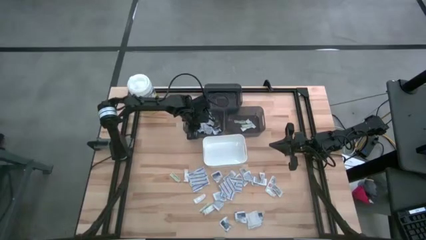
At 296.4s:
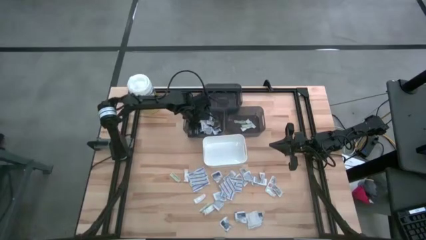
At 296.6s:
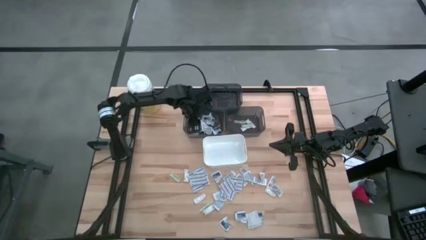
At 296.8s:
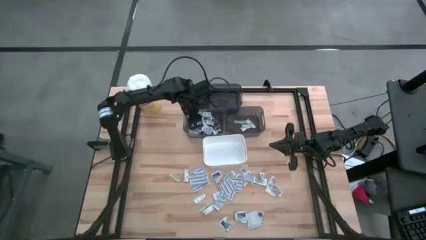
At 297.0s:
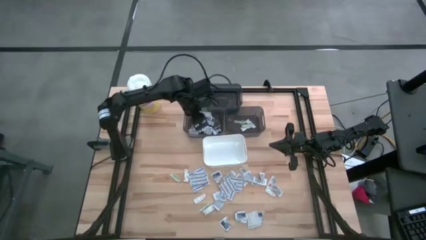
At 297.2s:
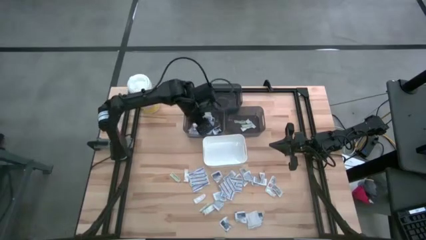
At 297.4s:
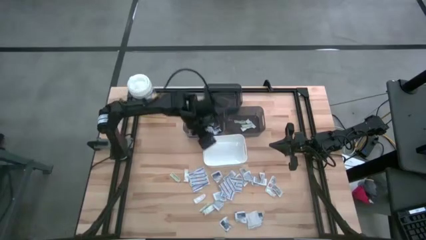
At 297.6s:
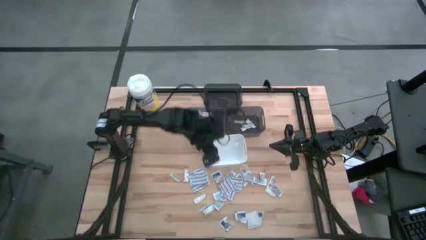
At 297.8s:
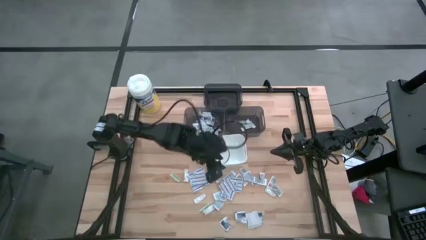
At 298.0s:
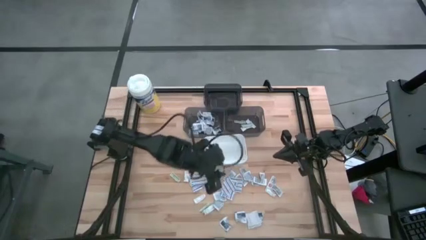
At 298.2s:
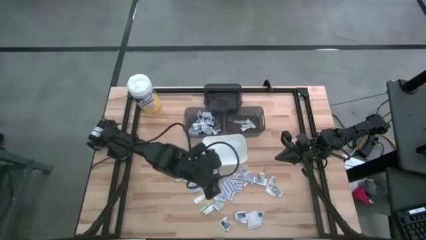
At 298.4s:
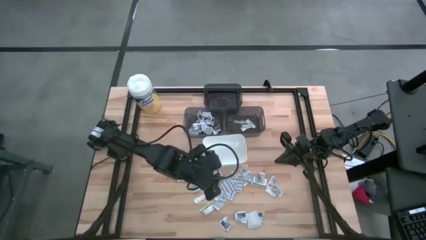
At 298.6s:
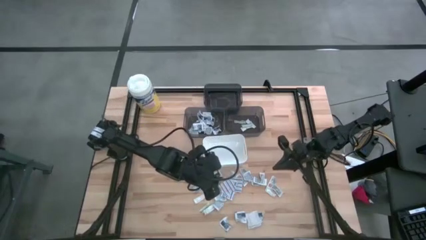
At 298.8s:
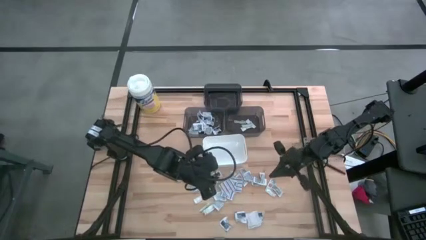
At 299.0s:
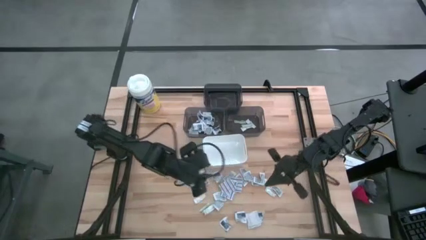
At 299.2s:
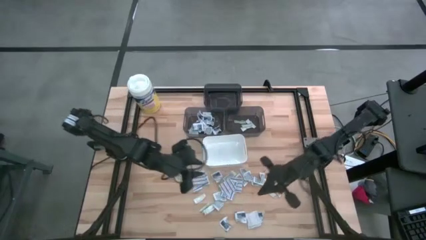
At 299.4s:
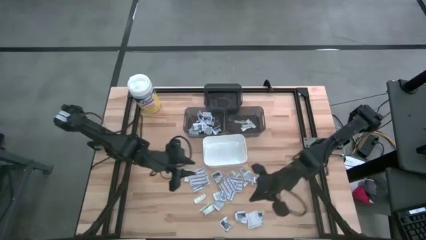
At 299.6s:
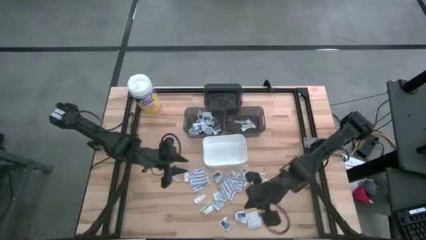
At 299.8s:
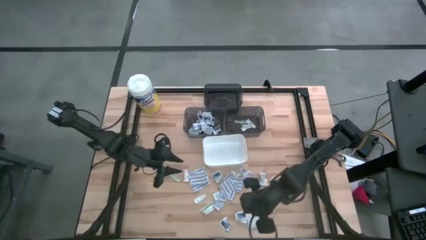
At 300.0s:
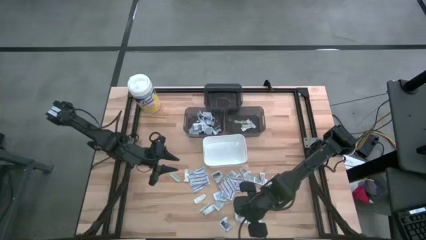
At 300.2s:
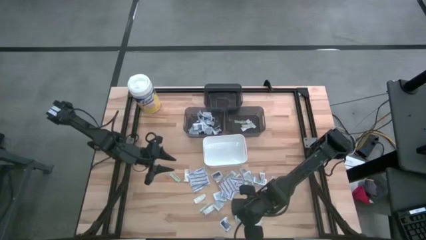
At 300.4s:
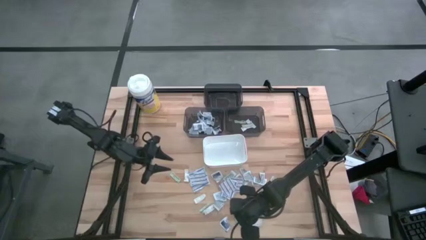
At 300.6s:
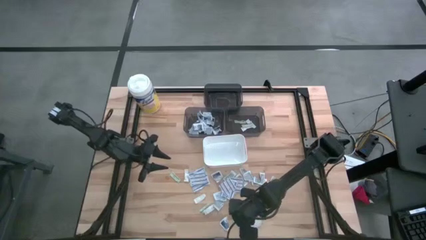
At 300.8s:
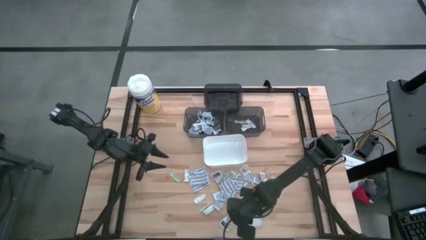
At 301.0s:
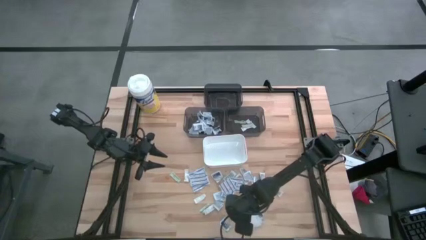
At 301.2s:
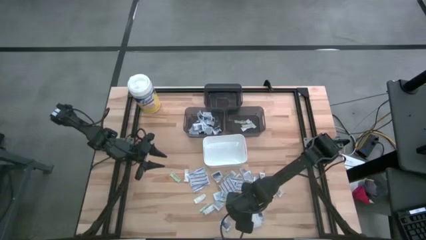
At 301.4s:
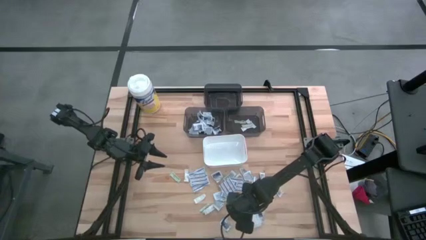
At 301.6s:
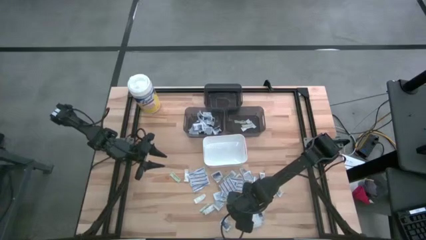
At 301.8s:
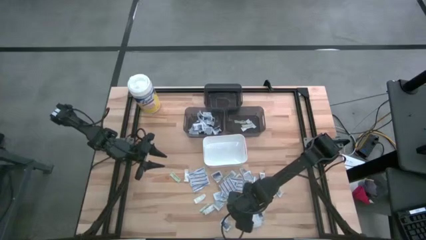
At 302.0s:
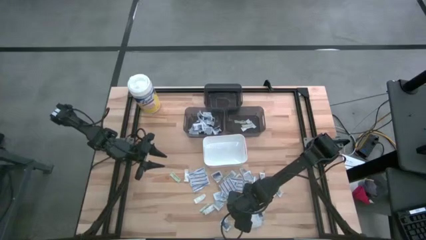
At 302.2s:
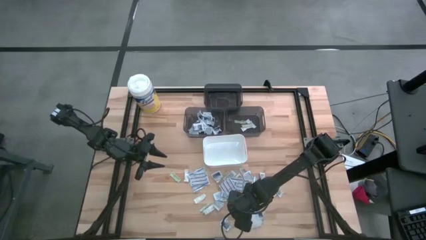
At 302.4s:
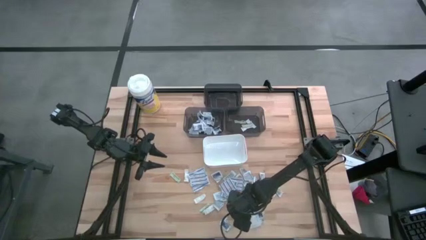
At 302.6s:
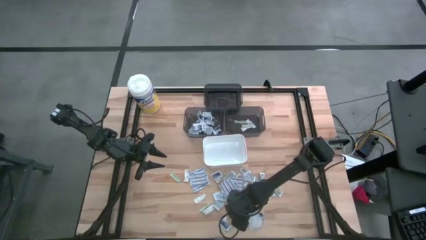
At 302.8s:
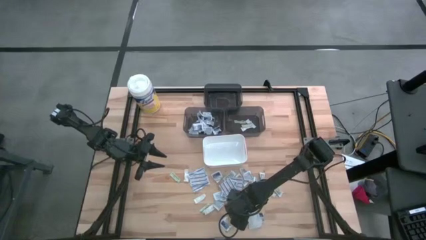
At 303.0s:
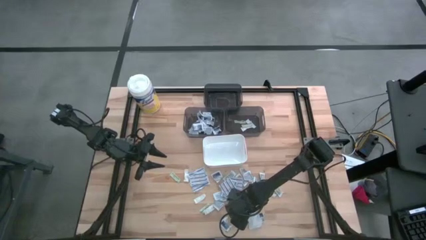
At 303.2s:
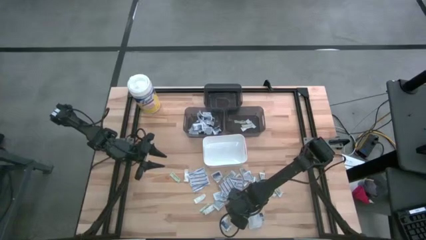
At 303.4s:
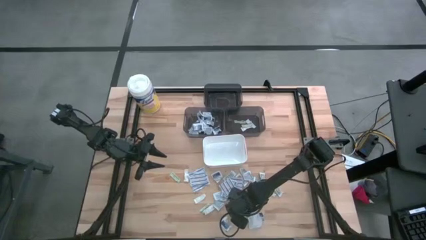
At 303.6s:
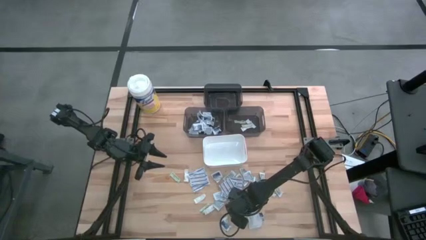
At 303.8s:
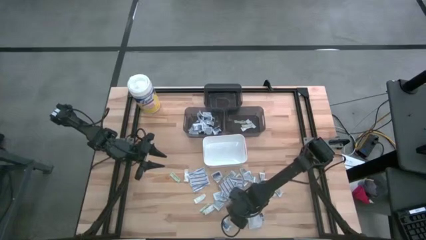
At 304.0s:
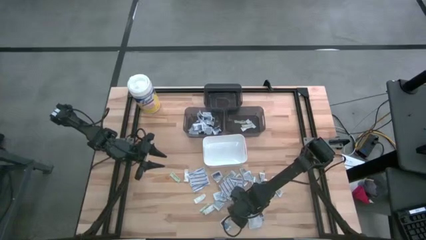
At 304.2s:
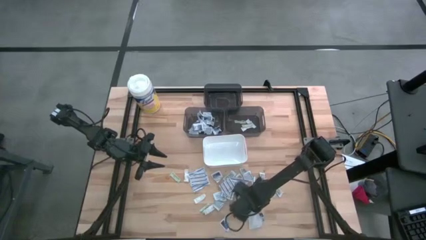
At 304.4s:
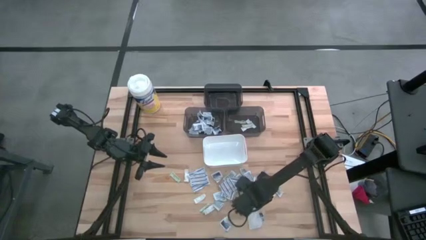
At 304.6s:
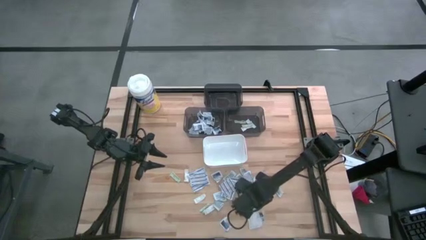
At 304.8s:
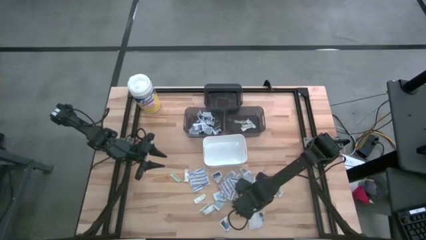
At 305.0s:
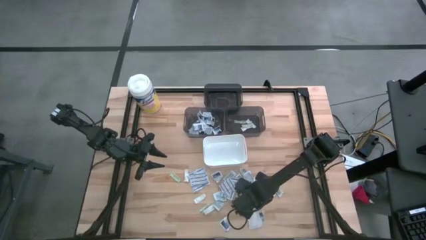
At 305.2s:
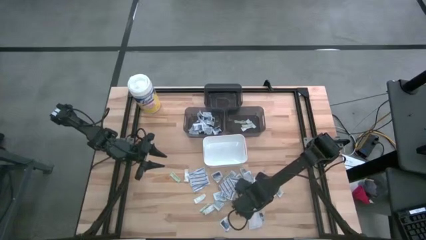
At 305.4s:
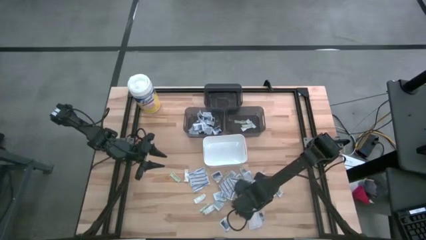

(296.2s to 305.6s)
Task: Pick & Place First Aid Supplies
Put the alcohol pad into the bottom left black bin

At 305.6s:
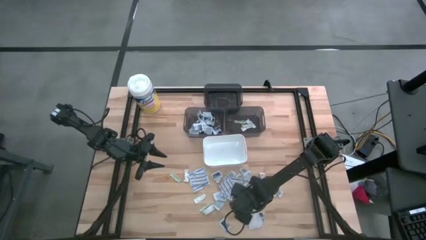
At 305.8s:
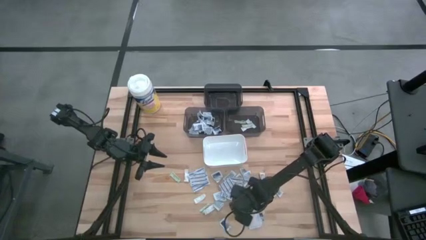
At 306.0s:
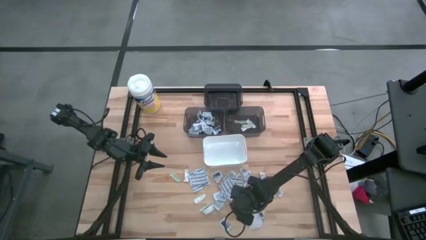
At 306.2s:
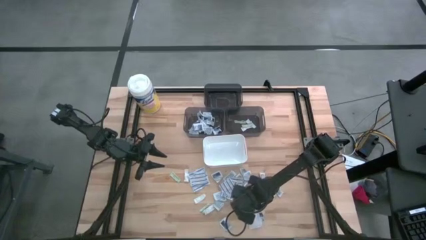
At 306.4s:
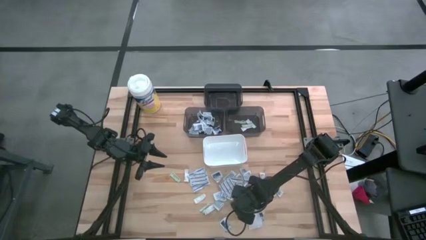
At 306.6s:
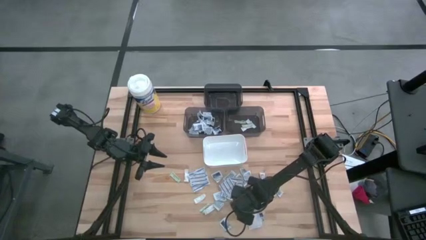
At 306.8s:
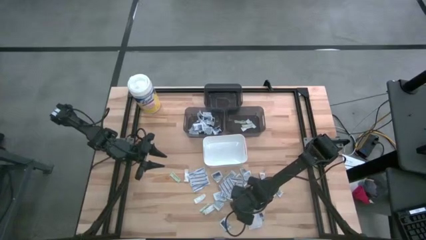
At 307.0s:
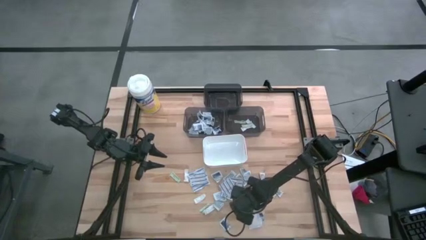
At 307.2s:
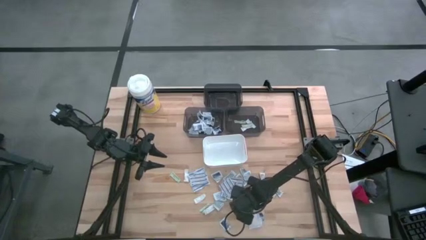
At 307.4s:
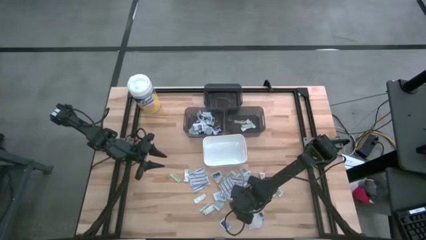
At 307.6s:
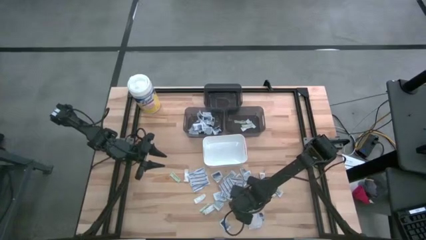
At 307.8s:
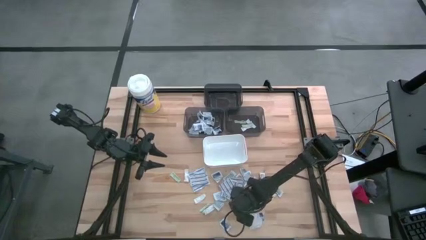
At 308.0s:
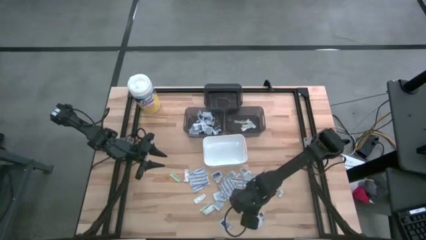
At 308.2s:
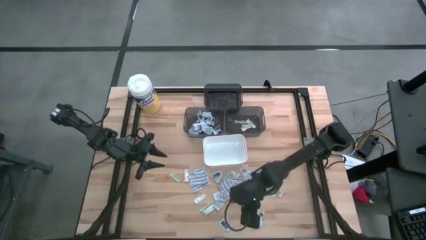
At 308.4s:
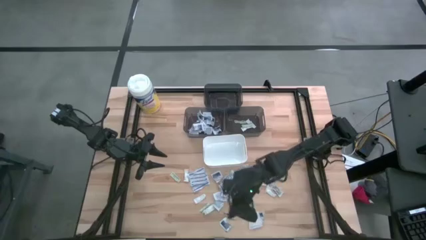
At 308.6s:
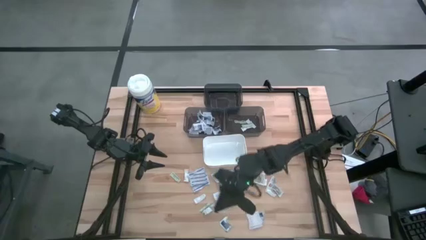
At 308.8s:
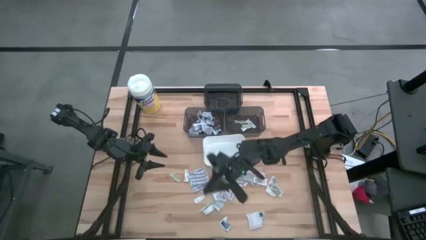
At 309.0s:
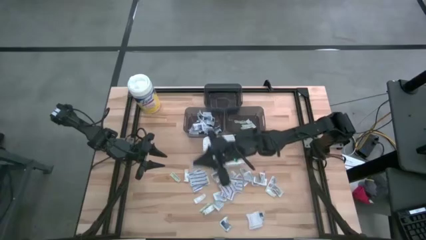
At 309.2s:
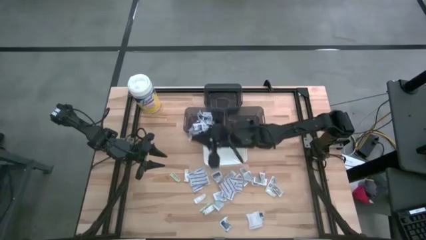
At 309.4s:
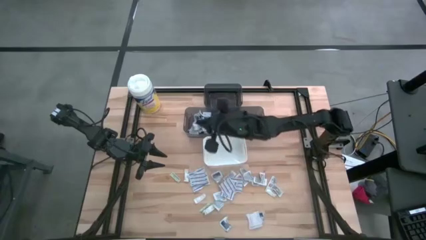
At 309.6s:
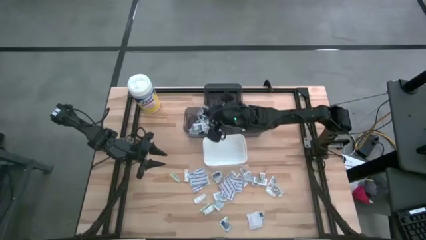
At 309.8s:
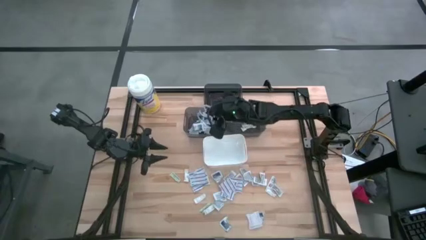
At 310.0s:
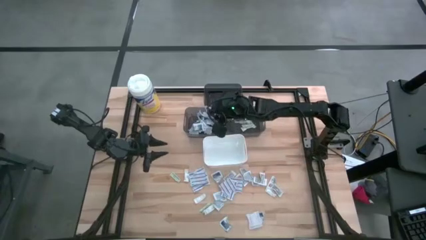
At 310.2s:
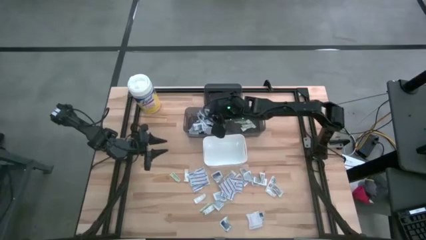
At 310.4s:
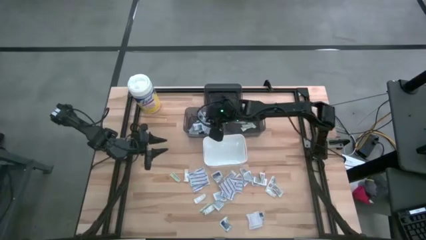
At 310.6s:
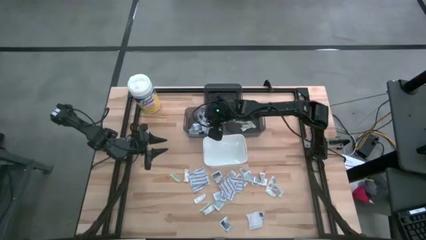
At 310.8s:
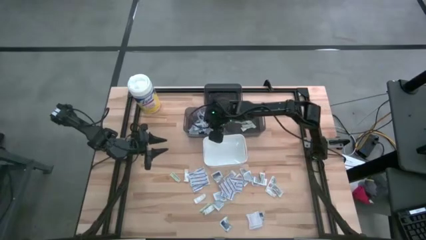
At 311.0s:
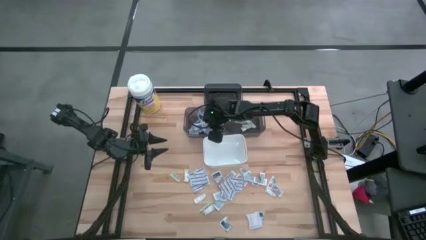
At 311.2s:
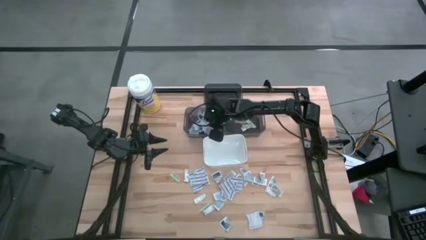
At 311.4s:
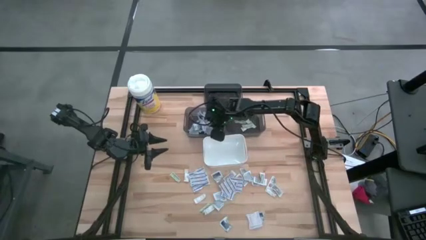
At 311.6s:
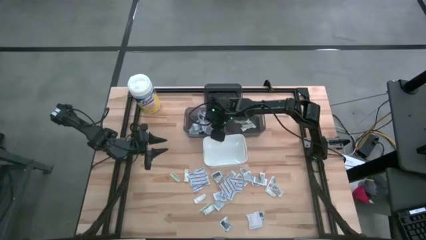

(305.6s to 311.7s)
Put the alcohol pad into the bottom left black bin
